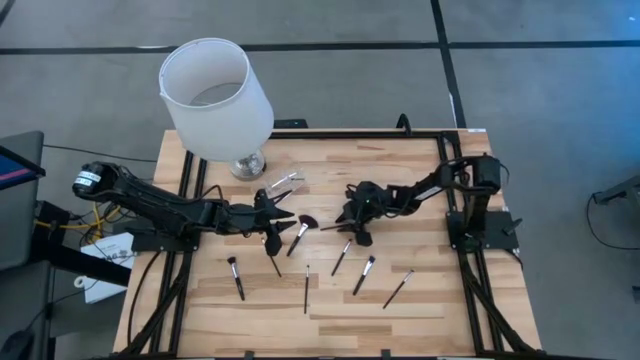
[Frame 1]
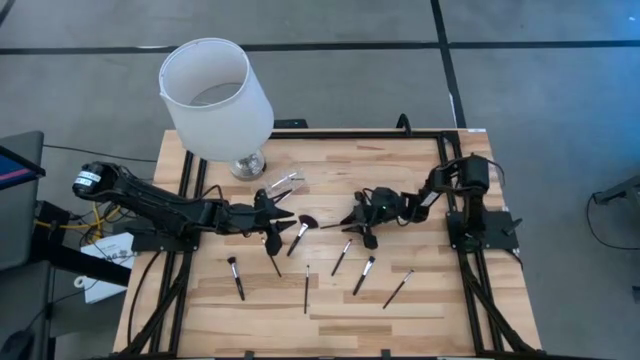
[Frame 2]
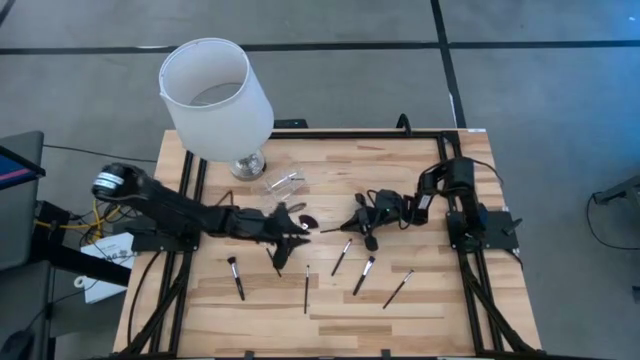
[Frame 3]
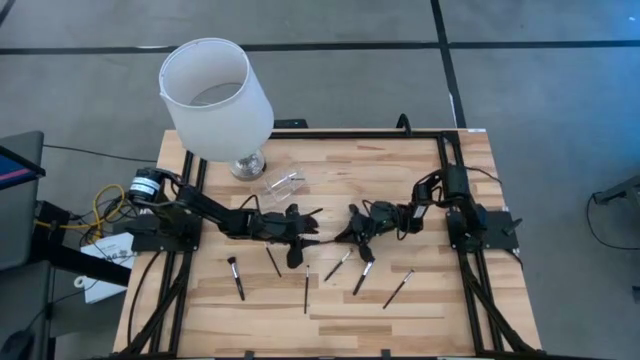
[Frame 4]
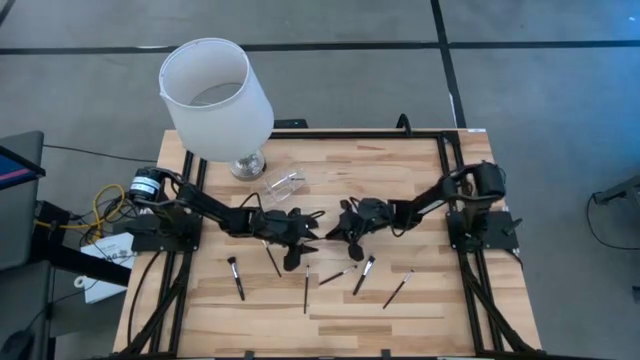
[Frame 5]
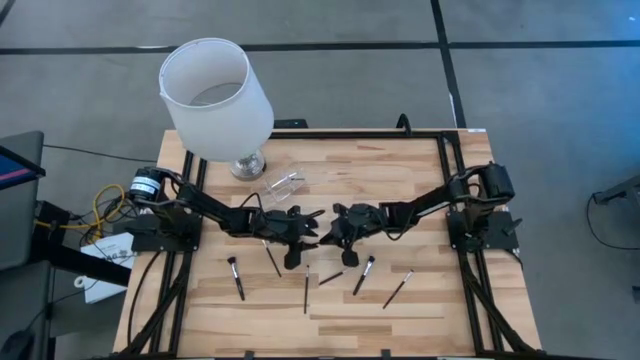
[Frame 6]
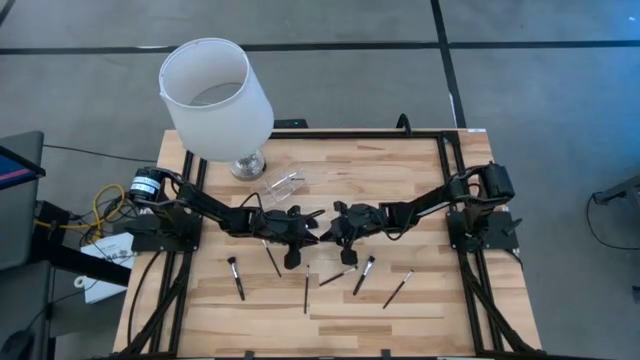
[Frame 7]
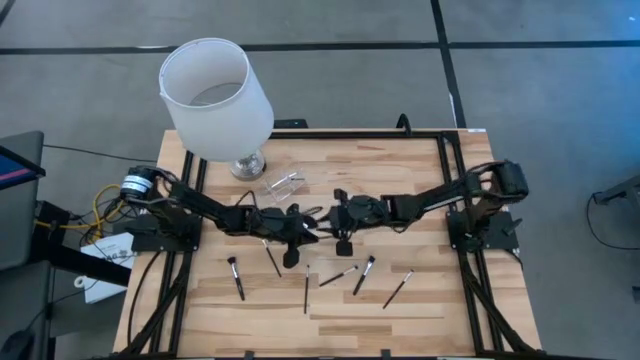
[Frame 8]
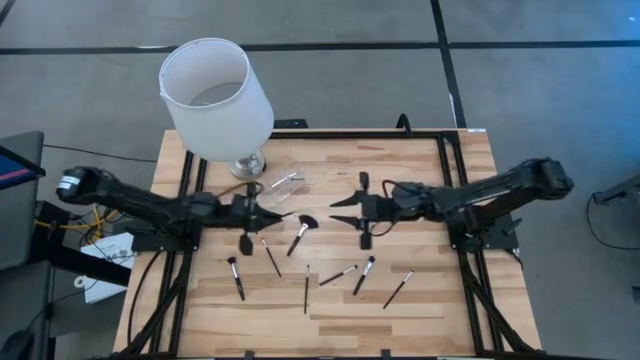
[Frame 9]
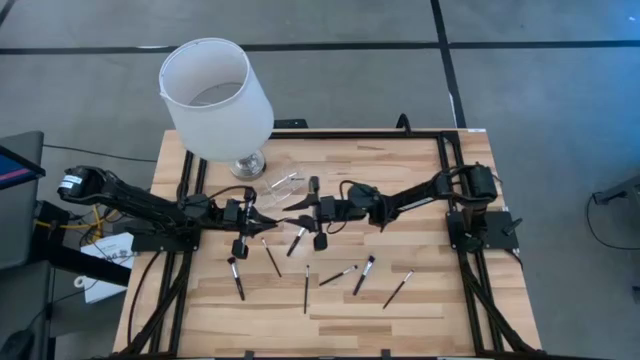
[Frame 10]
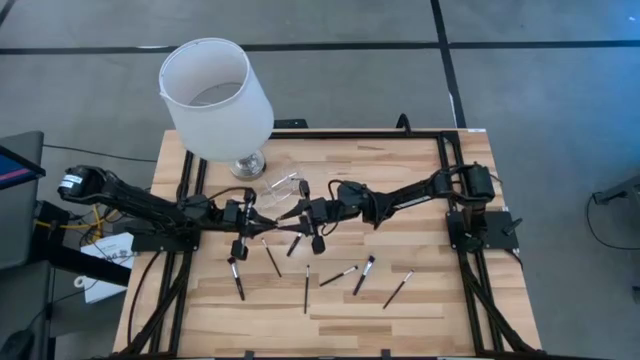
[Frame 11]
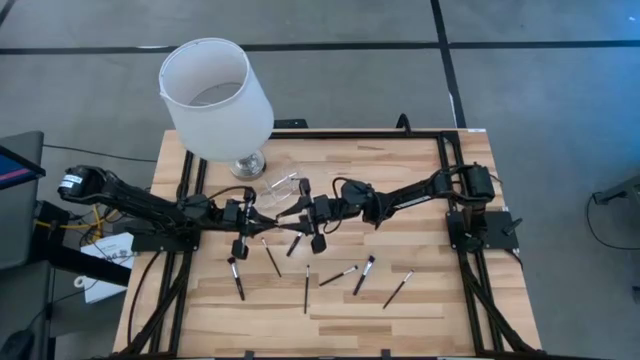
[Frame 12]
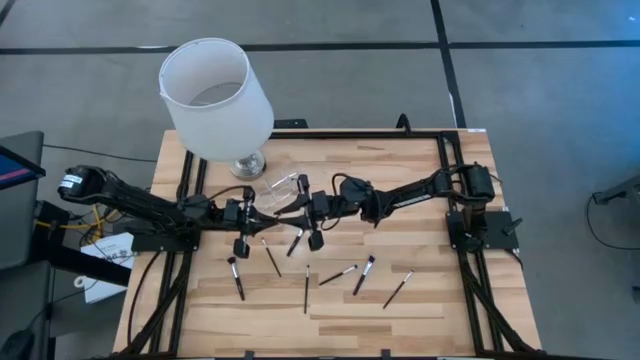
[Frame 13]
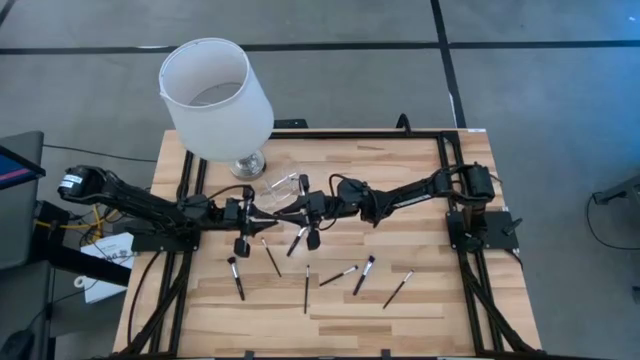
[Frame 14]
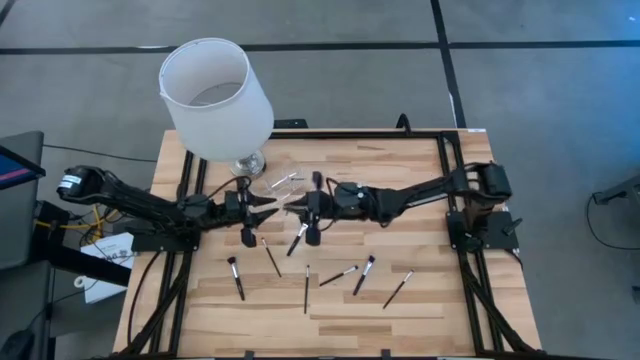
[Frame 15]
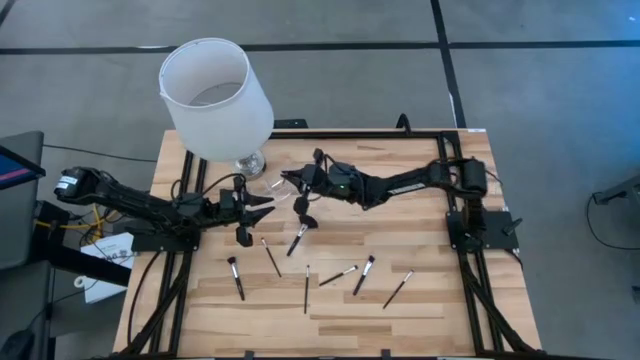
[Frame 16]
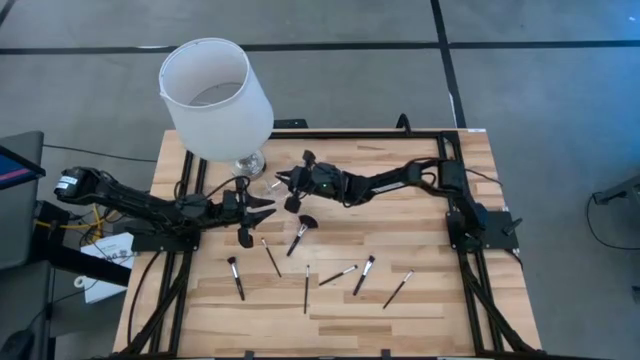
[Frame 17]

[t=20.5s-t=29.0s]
Task: Put items in baskets/containers
Put the black liner brush in the transparent organizer

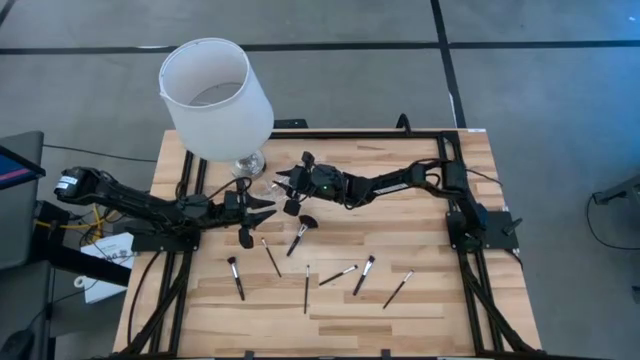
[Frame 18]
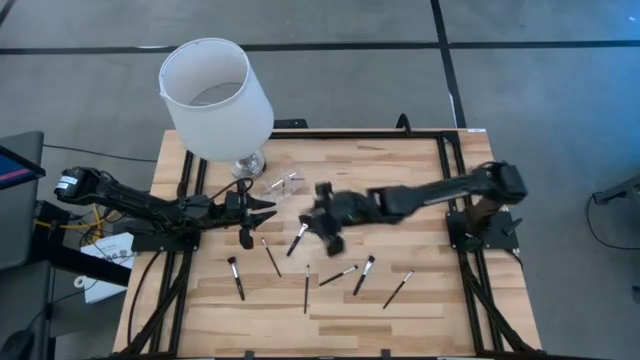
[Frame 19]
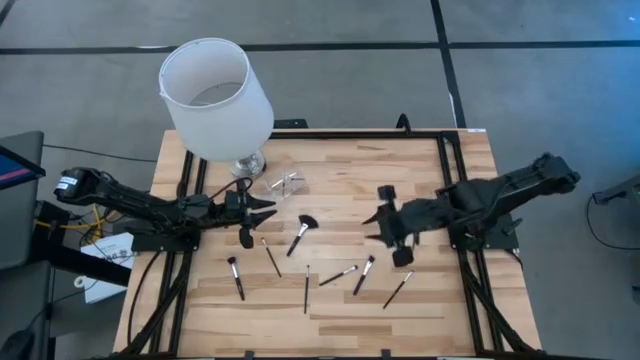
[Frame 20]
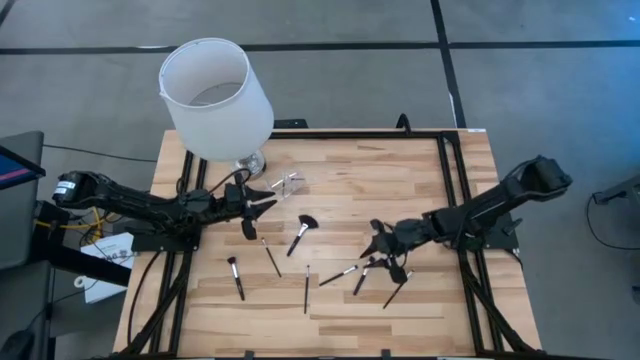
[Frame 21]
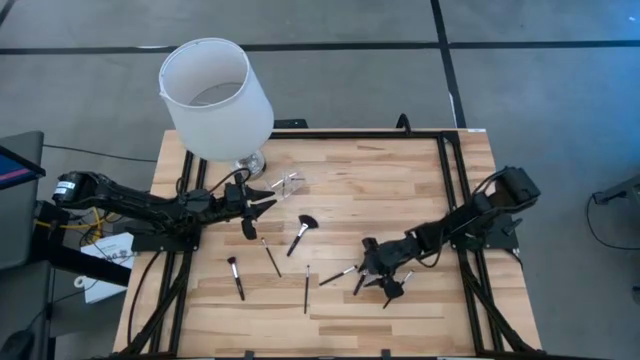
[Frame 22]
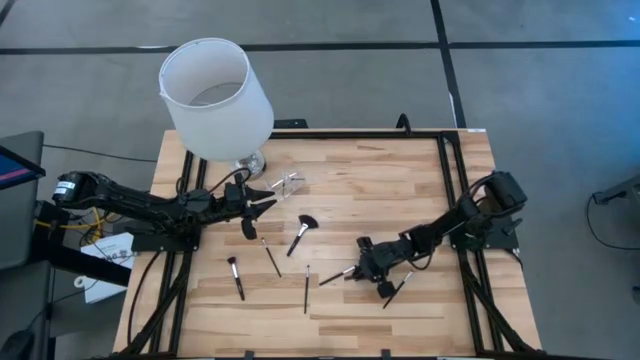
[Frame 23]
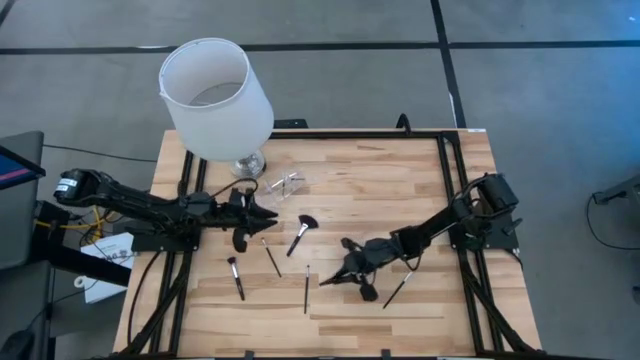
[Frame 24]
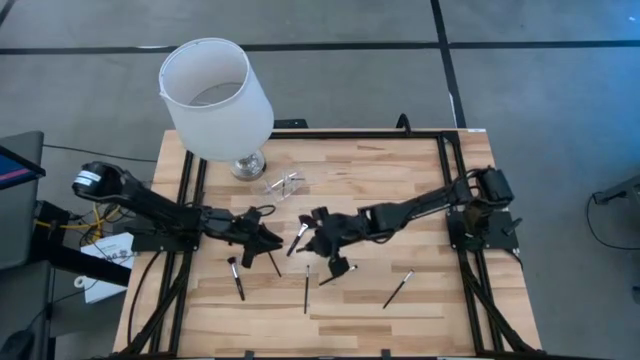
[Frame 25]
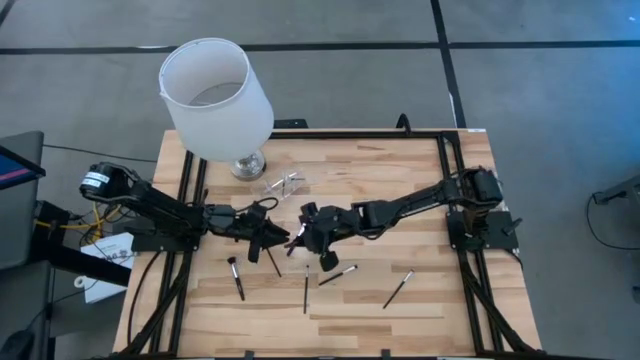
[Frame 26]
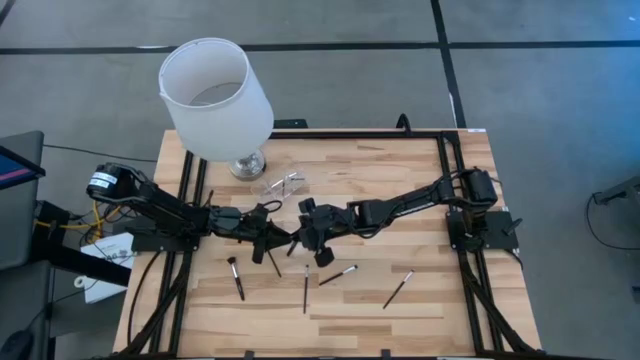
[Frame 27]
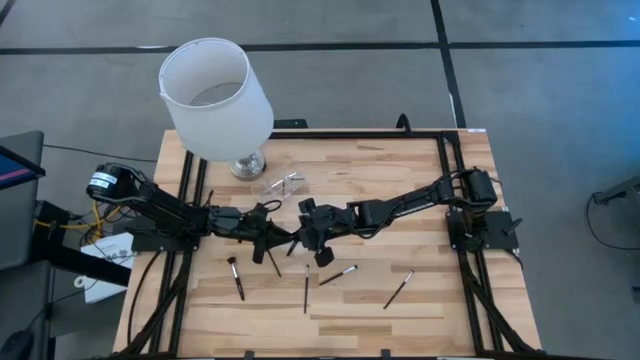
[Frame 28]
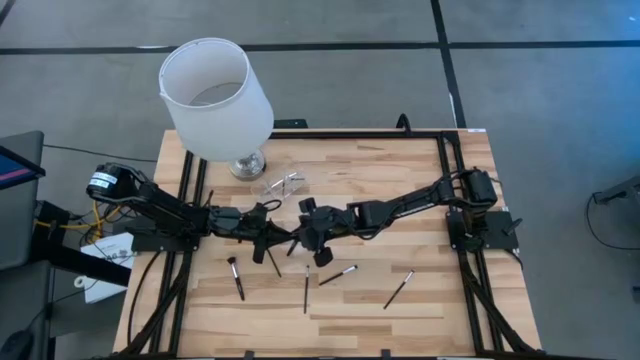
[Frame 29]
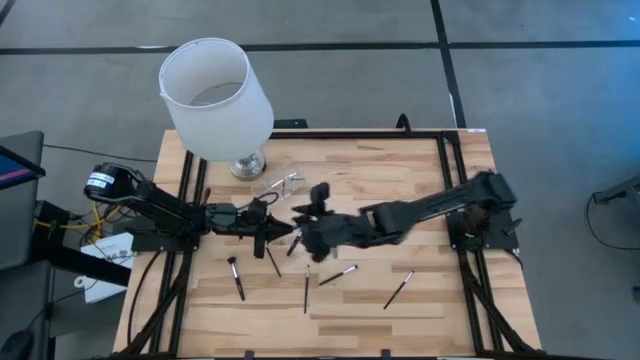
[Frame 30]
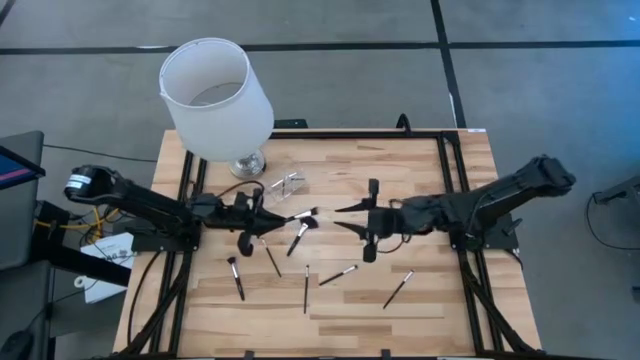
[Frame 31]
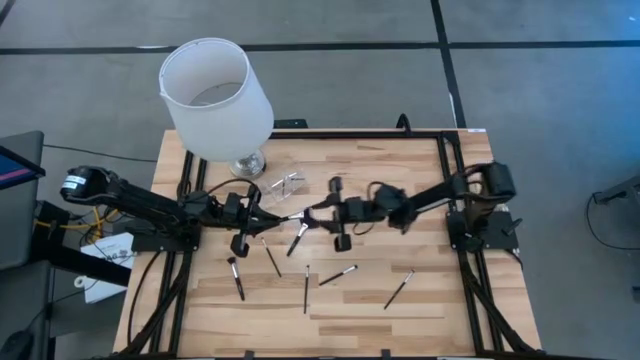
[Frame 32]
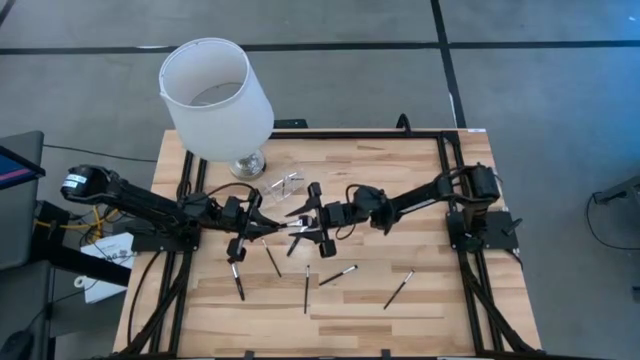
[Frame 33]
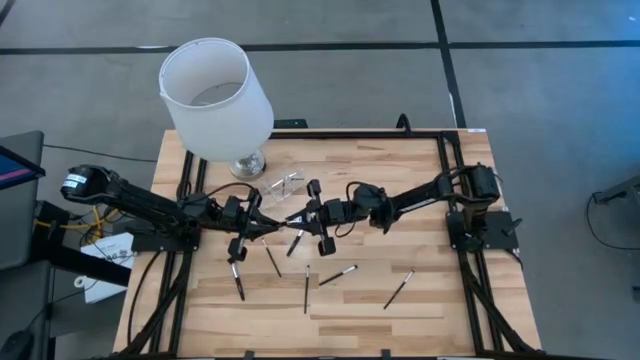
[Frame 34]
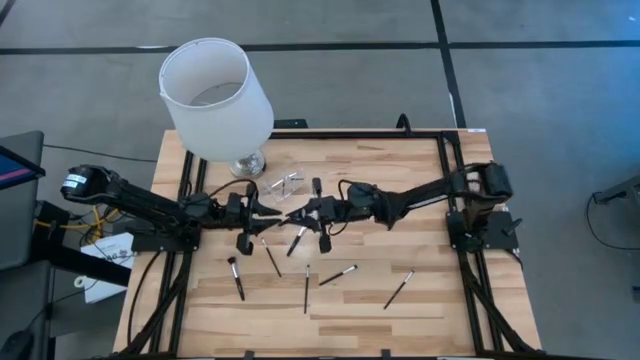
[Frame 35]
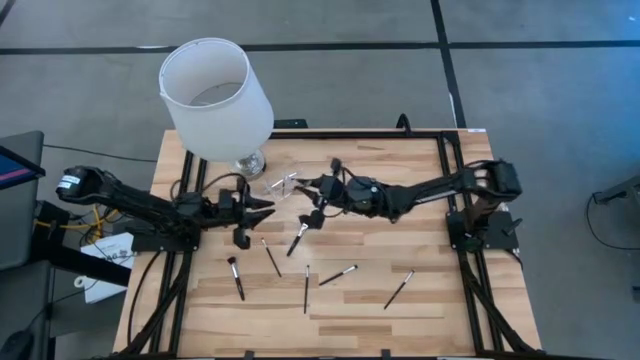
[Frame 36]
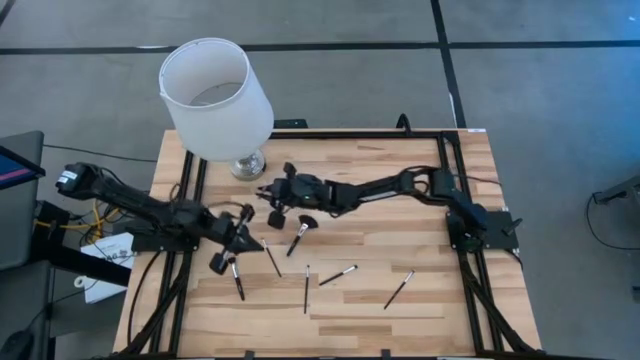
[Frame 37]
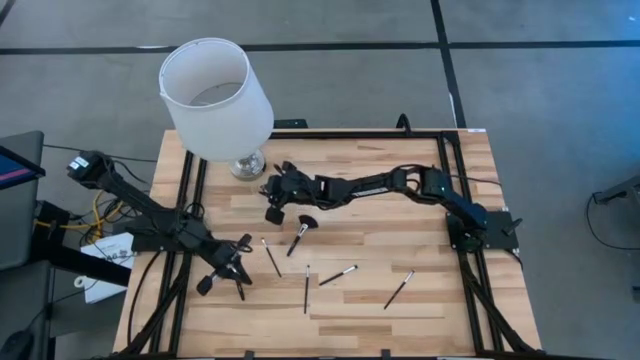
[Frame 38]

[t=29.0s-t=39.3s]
Put the black powder brush in the transparent organizer

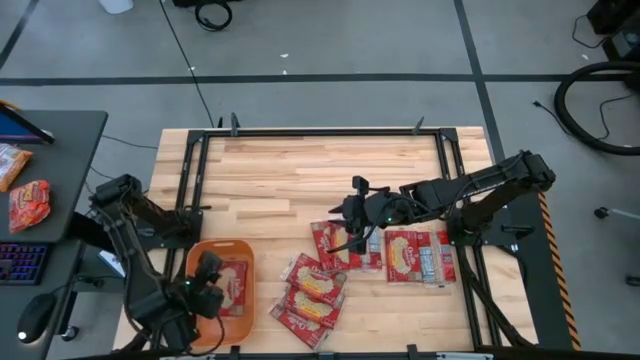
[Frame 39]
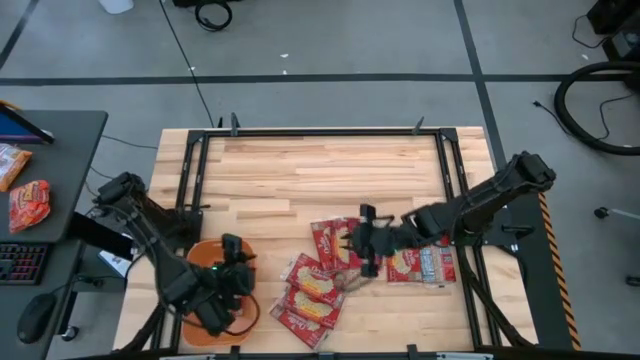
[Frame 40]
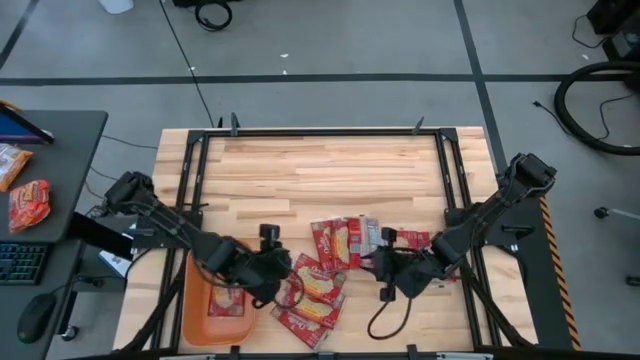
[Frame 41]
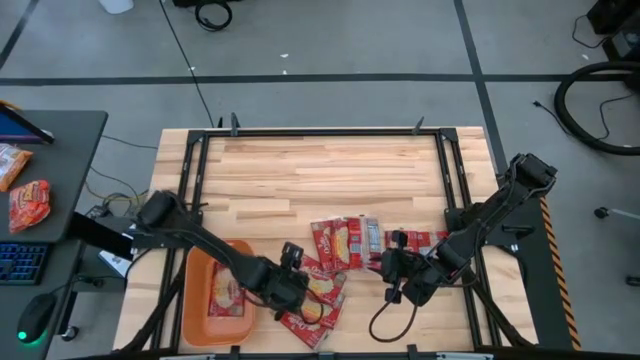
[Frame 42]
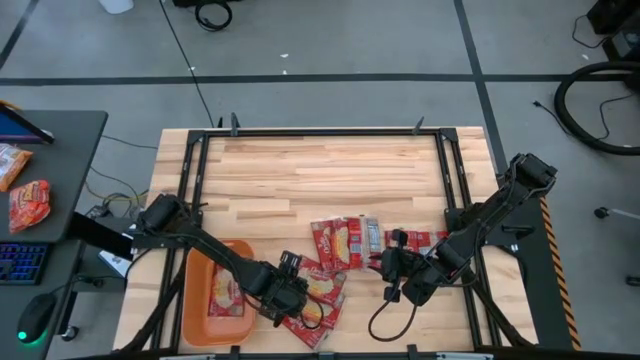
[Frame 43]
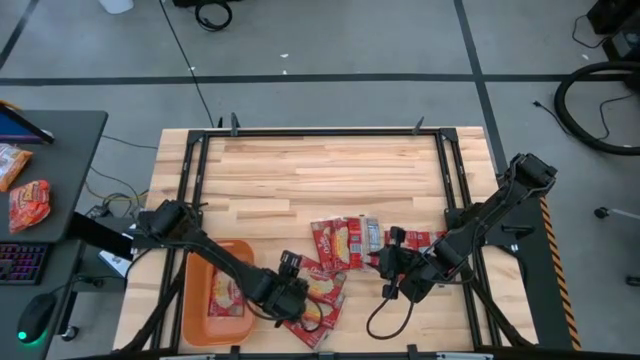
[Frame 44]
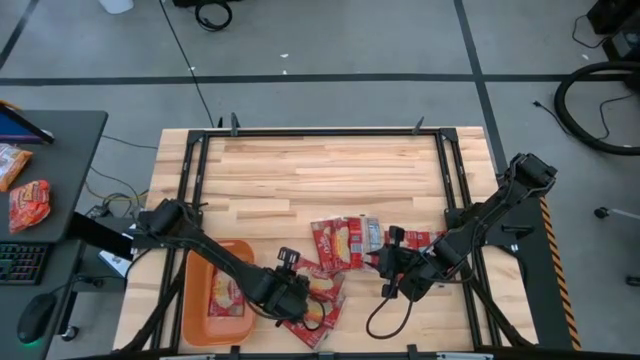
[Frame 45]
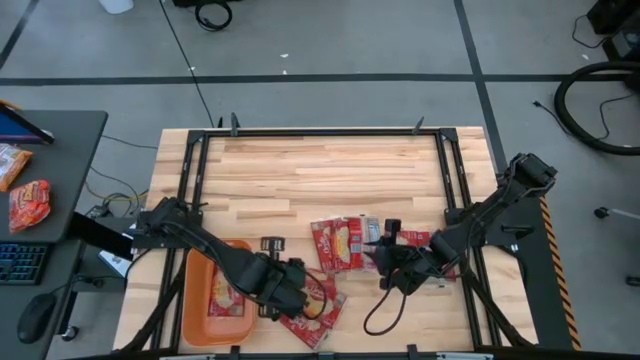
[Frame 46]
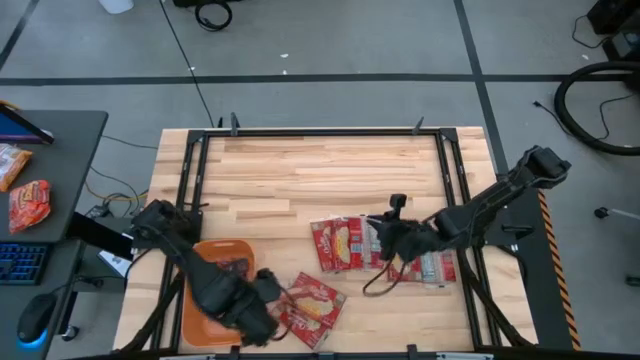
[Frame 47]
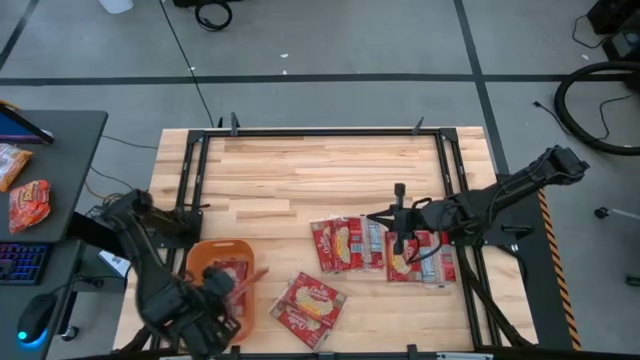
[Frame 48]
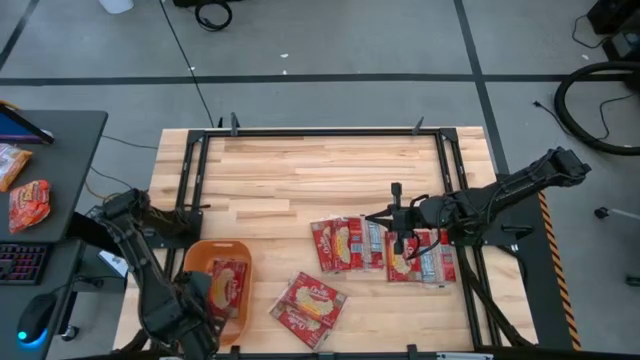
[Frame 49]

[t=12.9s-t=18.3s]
Task: Sort popcorn bags into baskets
Put the popcorn bag into the orange bin
